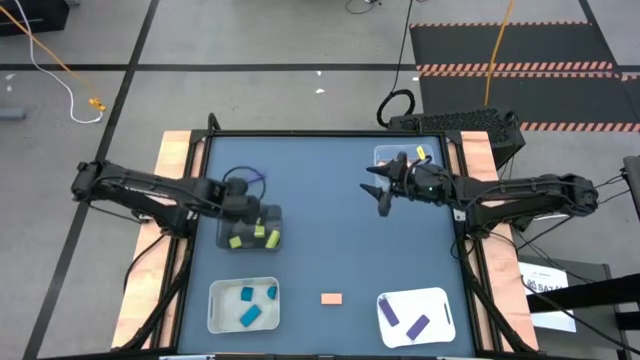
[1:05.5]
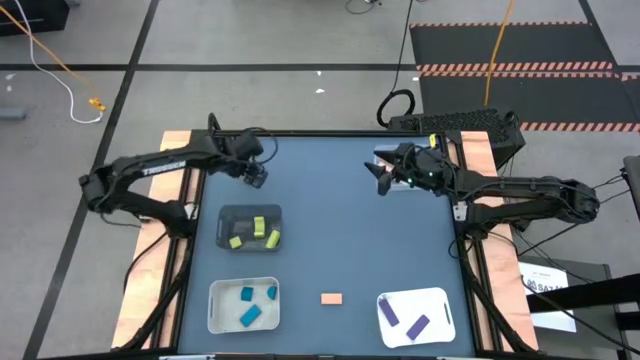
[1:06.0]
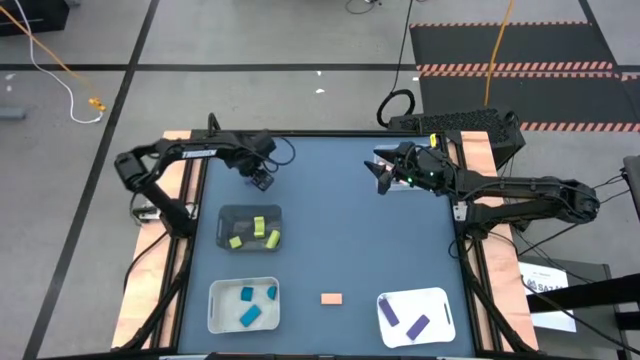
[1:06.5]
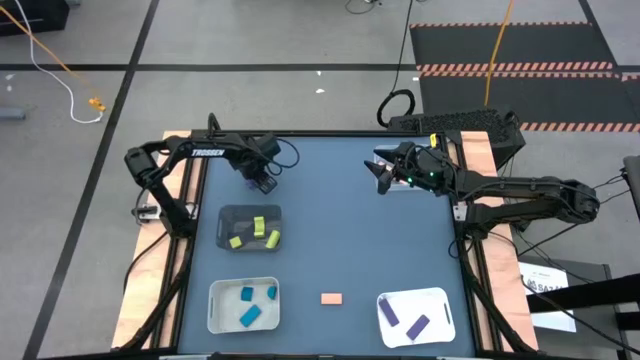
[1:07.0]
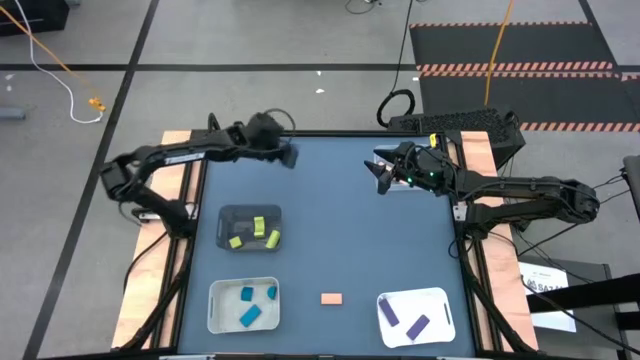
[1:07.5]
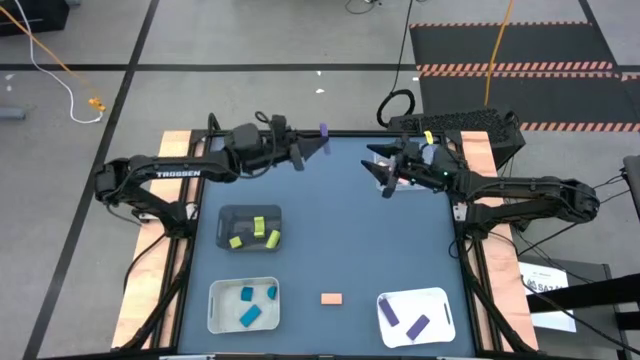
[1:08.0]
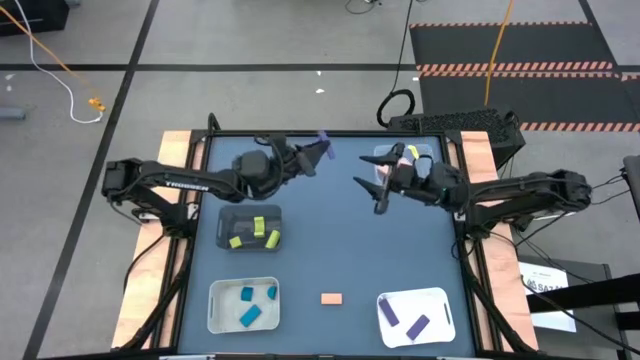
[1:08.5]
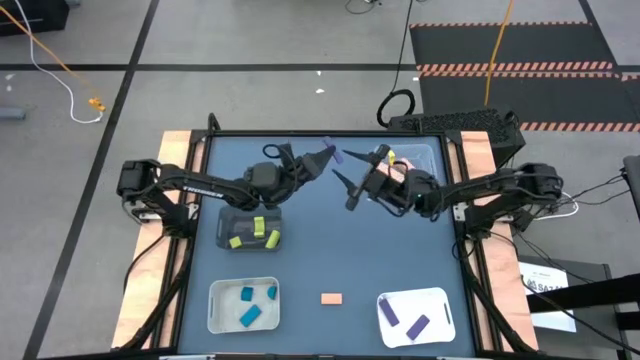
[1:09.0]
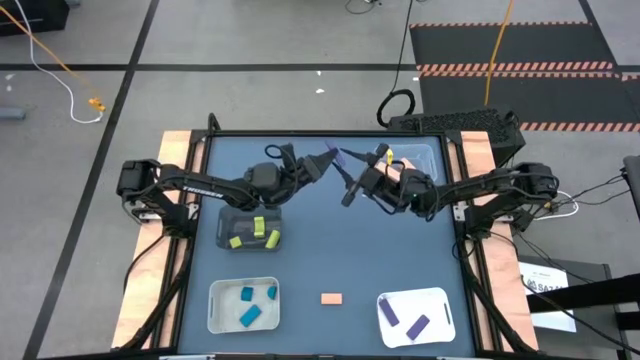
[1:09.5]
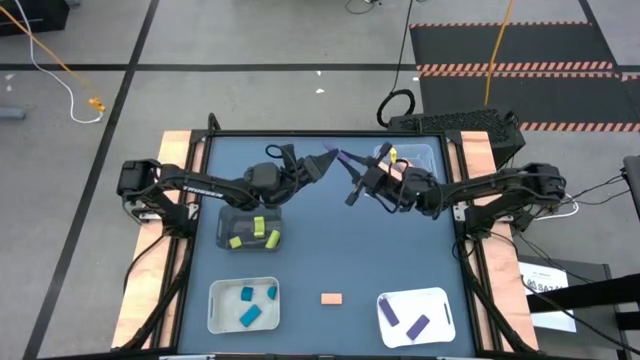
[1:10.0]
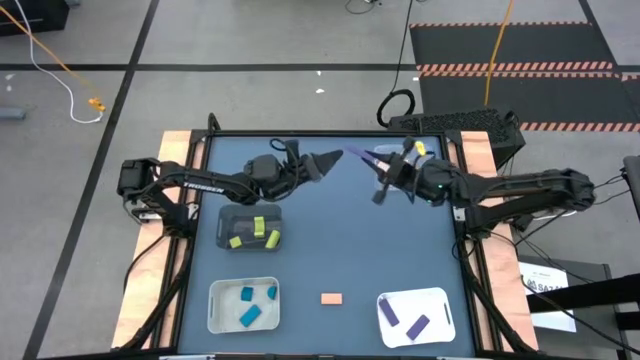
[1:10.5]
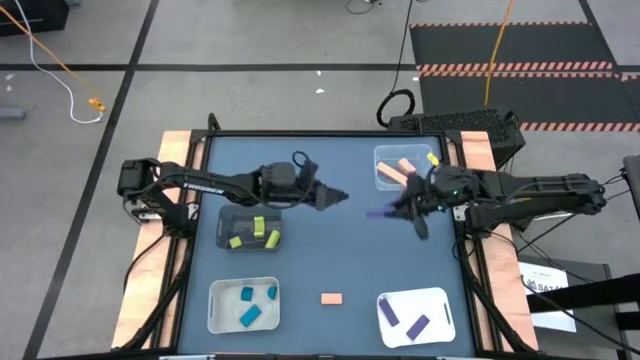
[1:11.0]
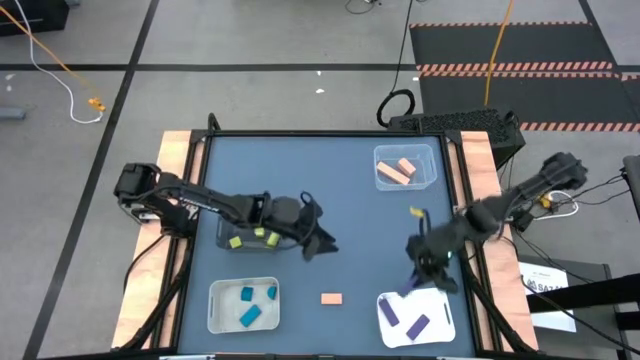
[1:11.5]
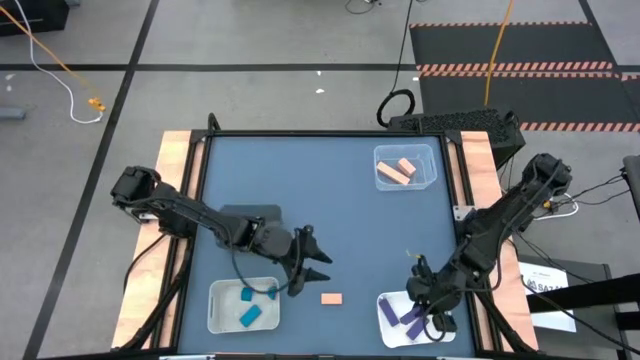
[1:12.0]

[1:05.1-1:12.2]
Task: Sort & place blocks by color
Put the violet block into the white bin

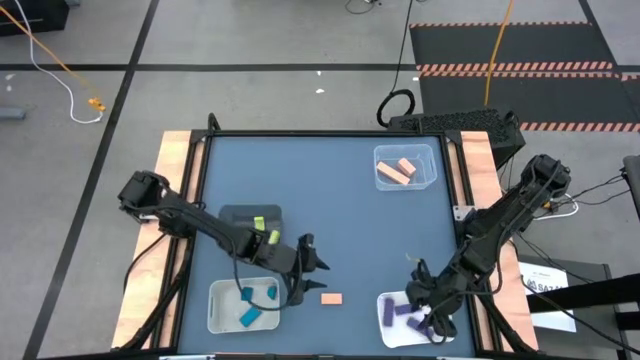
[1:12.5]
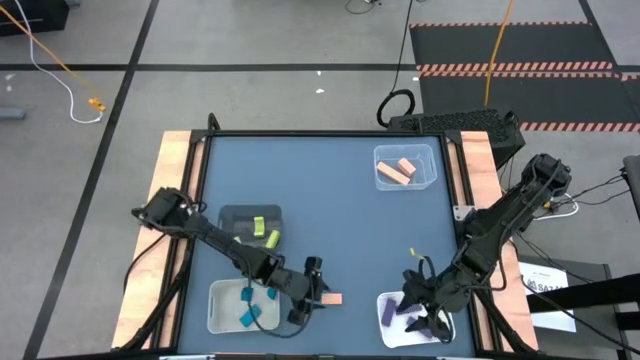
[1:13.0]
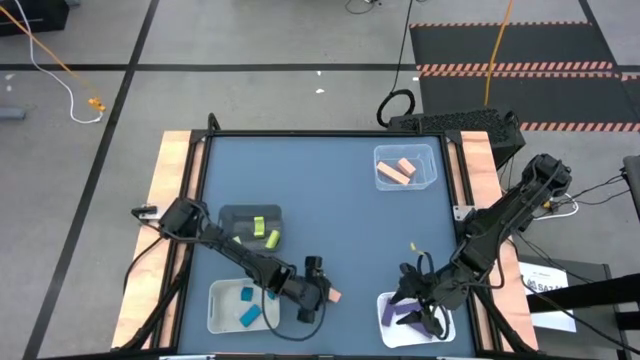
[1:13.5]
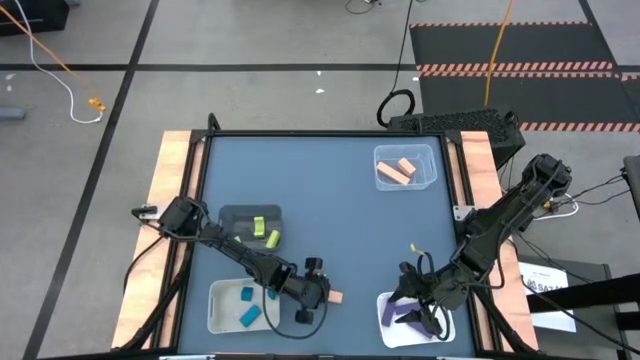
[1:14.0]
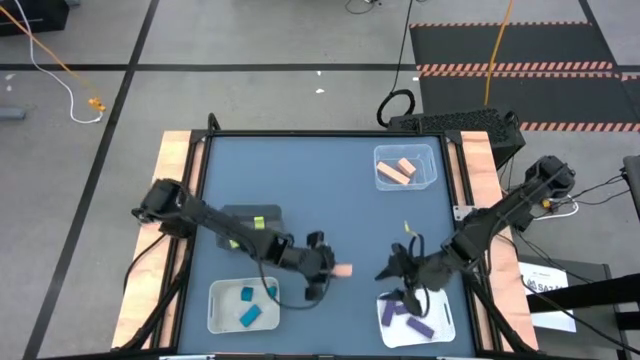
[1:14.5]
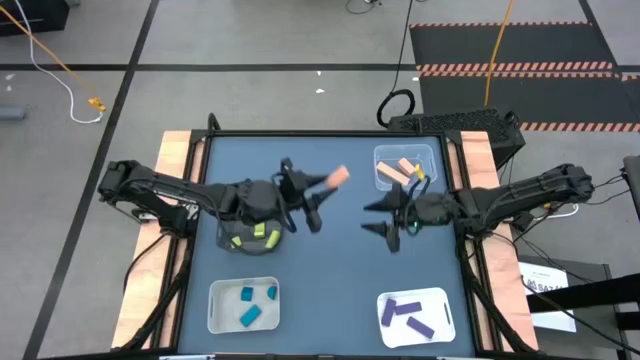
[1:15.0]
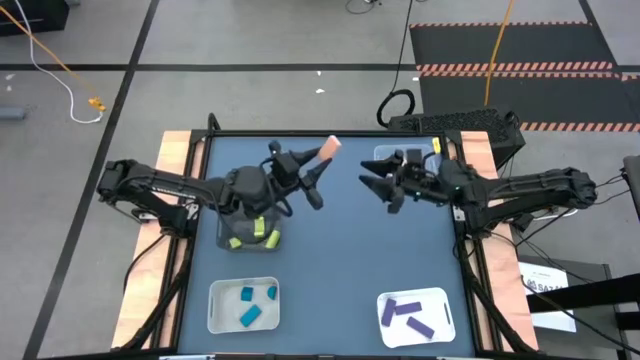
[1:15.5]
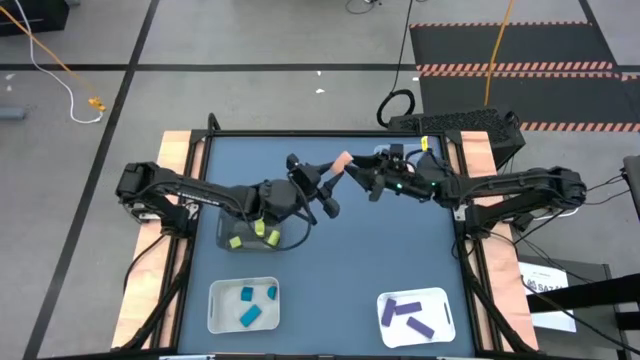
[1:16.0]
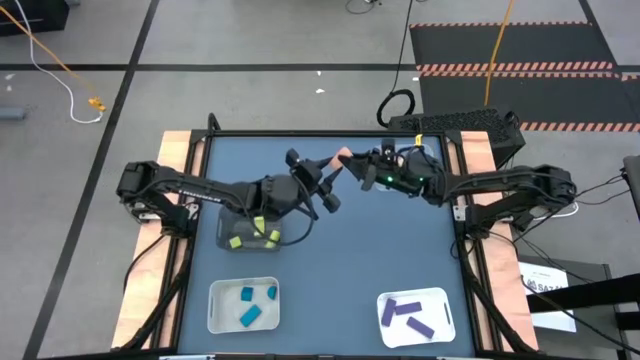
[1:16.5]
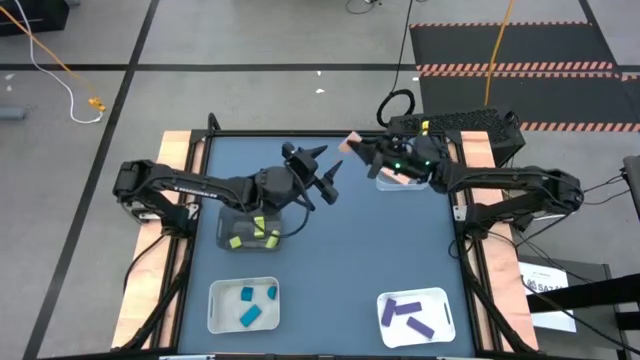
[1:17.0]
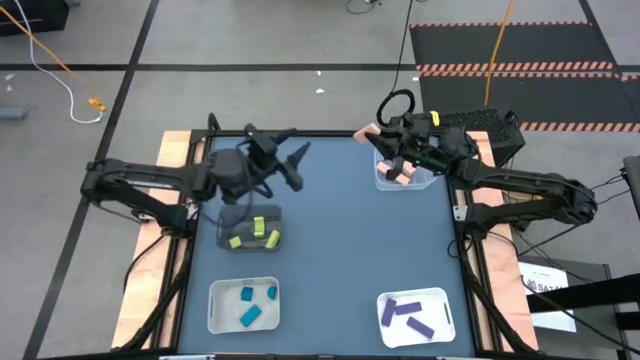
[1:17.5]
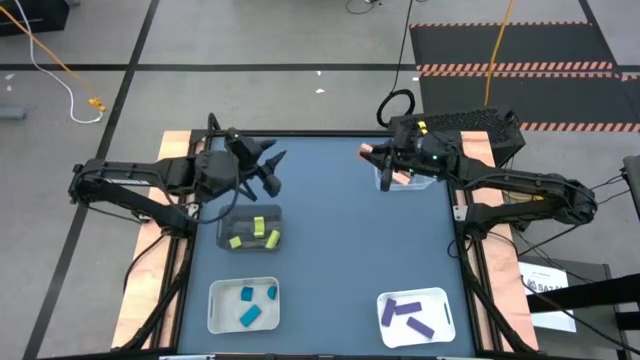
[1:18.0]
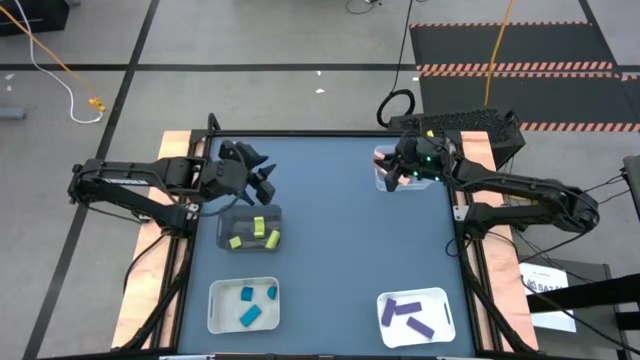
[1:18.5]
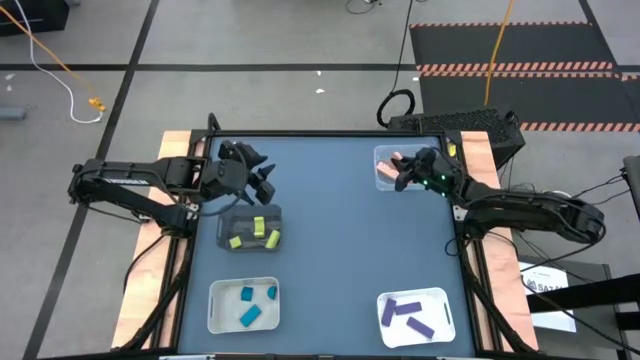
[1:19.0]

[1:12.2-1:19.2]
Put the light brown block into the transparent bin

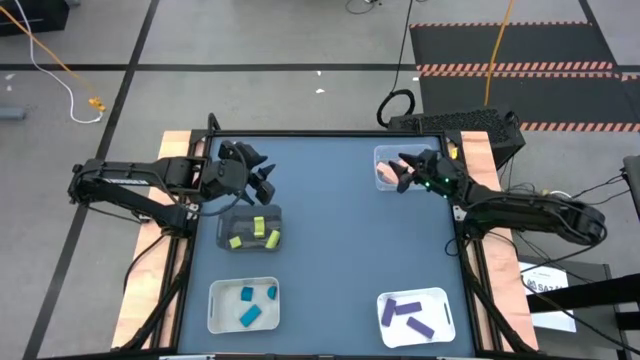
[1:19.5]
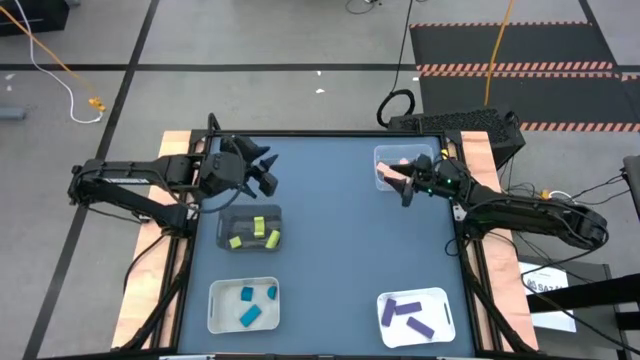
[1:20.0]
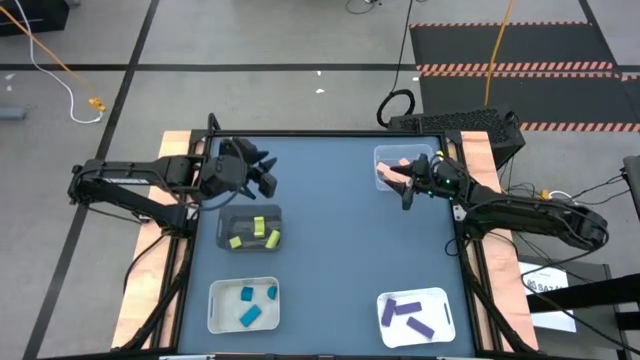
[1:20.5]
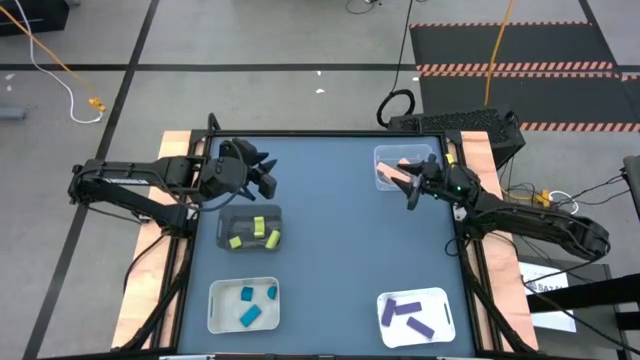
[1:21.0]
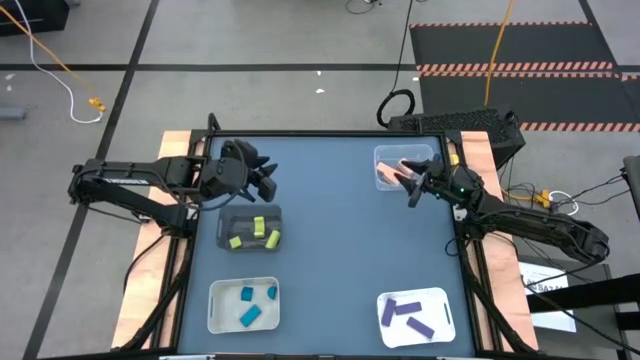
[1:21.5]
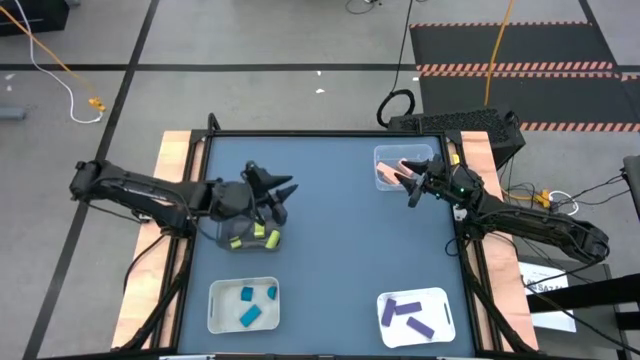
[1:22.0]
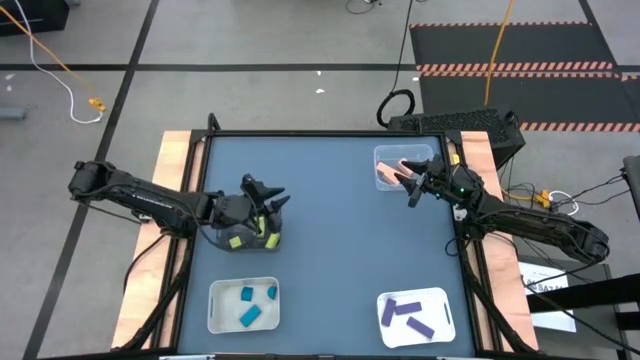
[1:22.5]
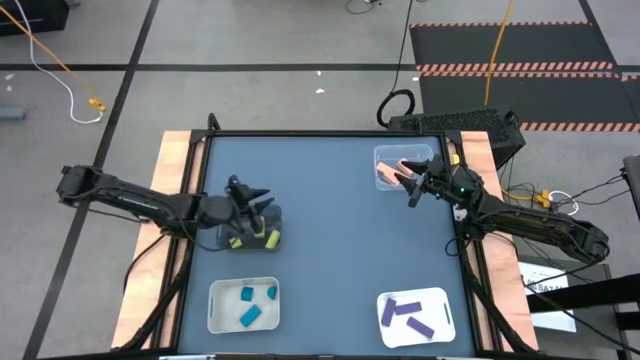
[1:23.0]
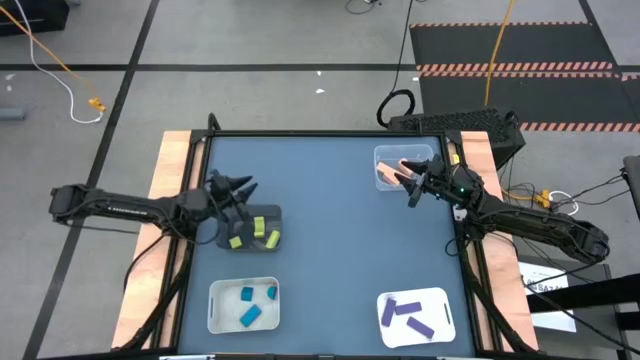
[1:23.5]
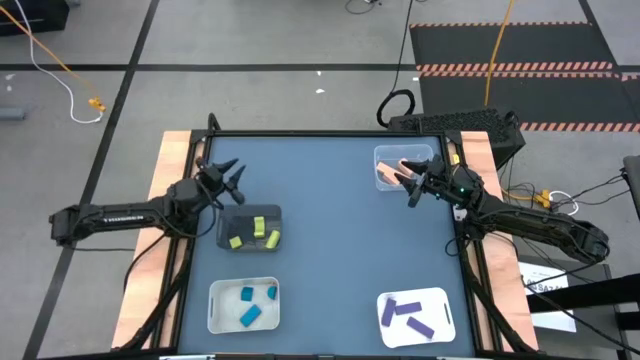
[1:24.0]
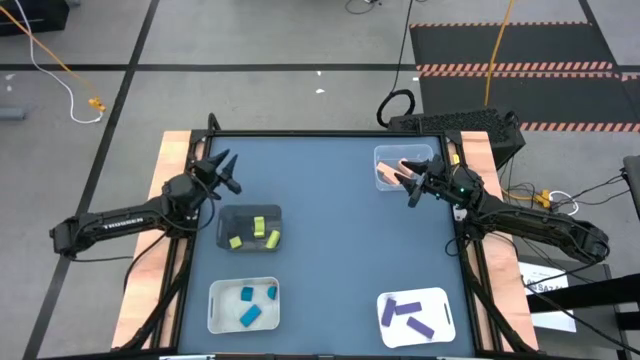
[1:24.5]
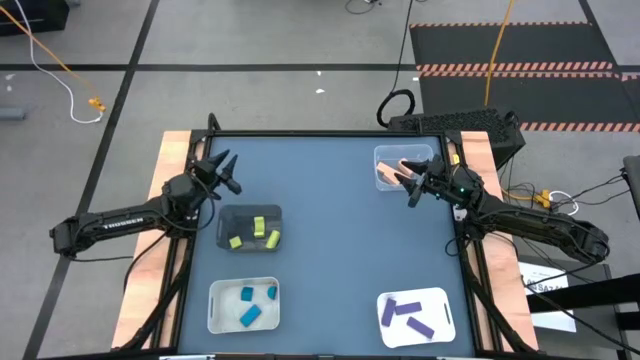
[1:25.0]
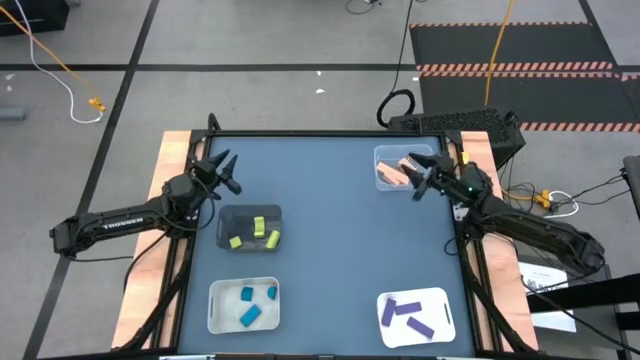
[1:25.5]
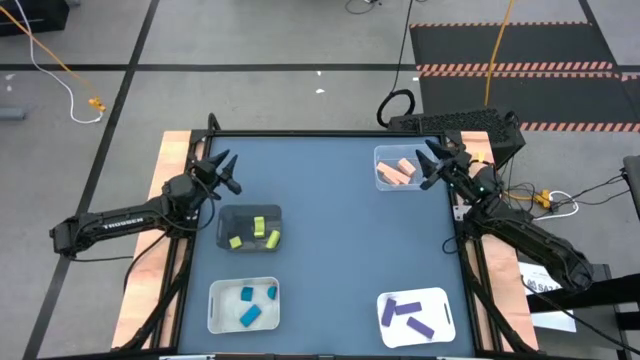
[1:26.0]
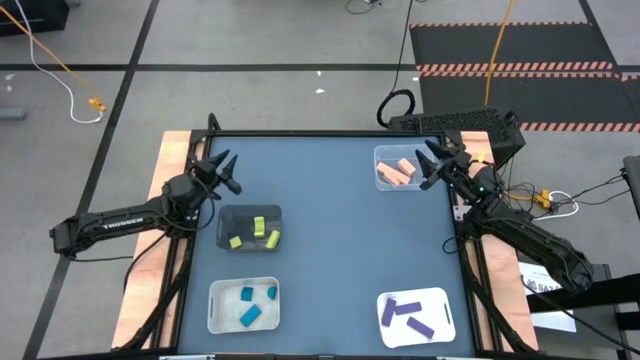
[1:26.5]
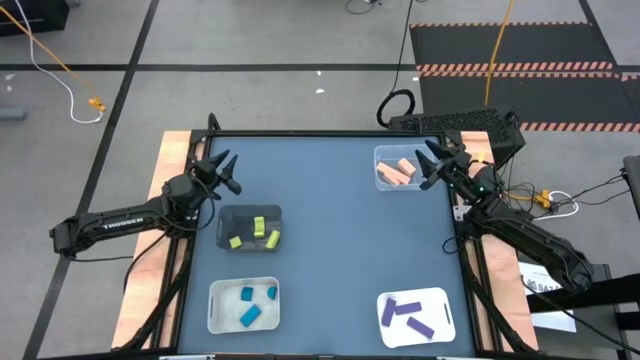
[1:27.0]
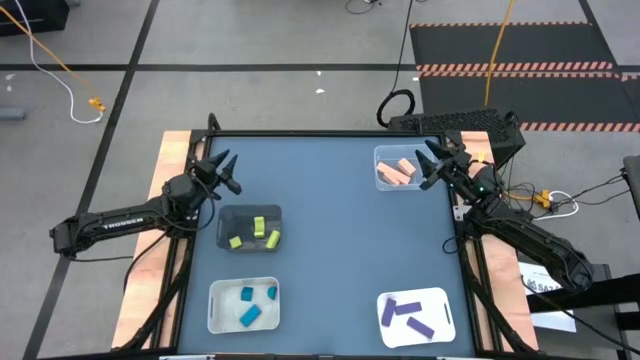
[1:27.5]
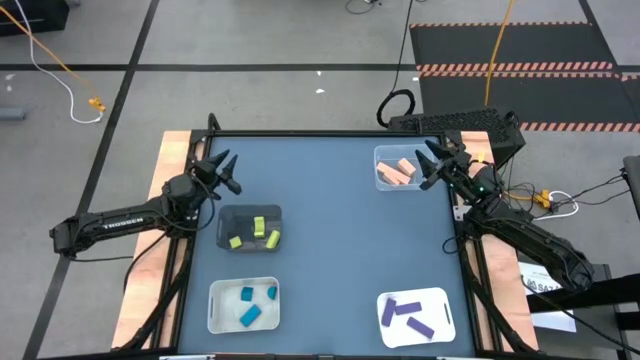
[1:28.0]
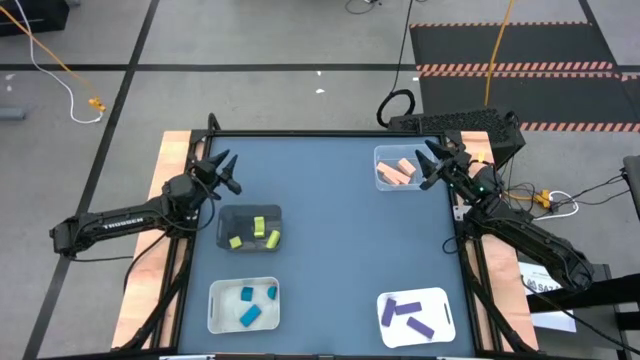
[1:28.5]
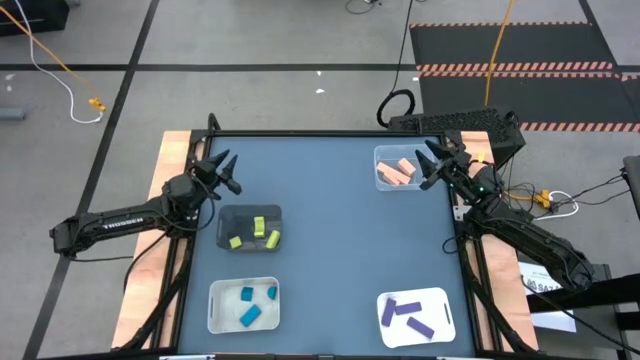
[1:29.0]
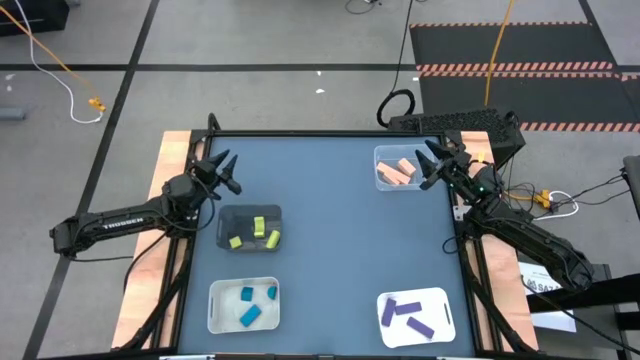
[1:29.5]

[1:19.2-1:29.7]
Return to Home Position
